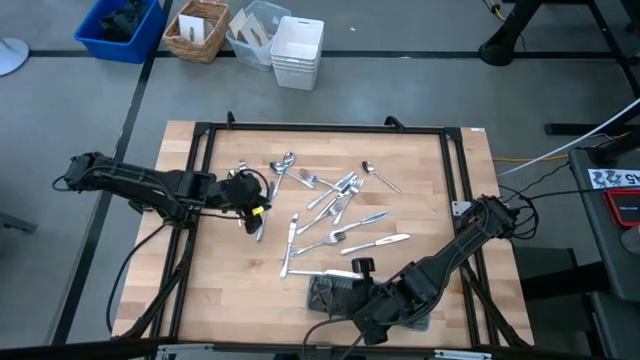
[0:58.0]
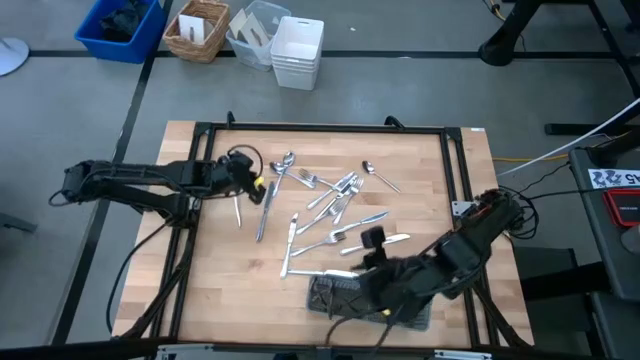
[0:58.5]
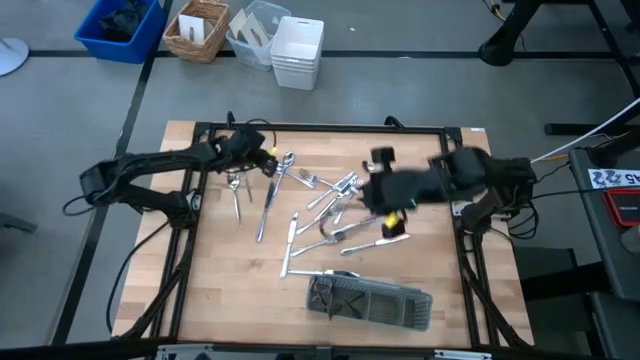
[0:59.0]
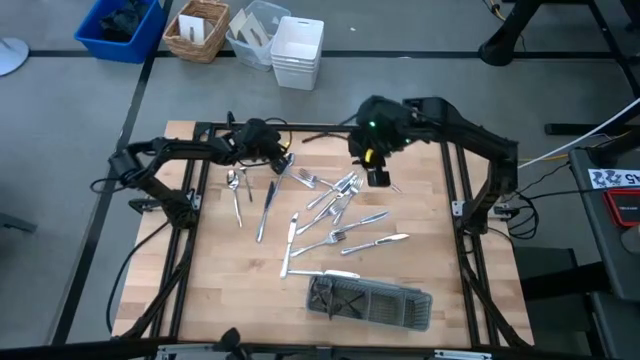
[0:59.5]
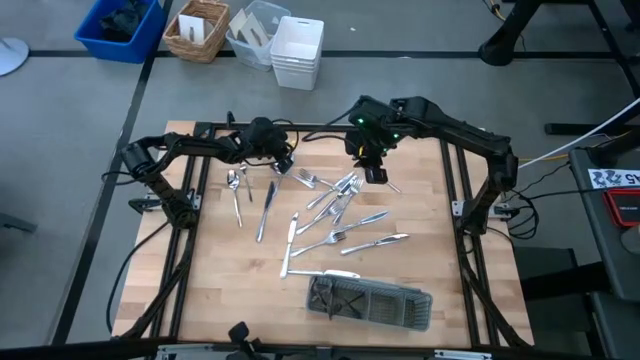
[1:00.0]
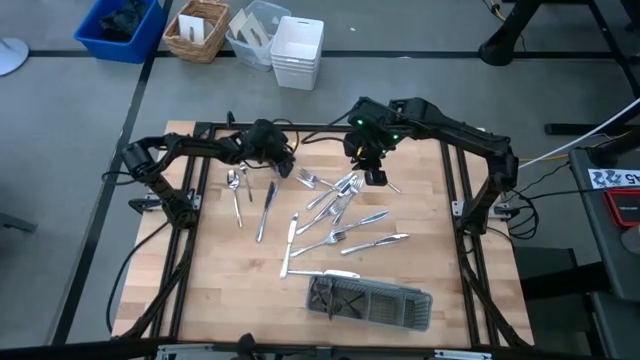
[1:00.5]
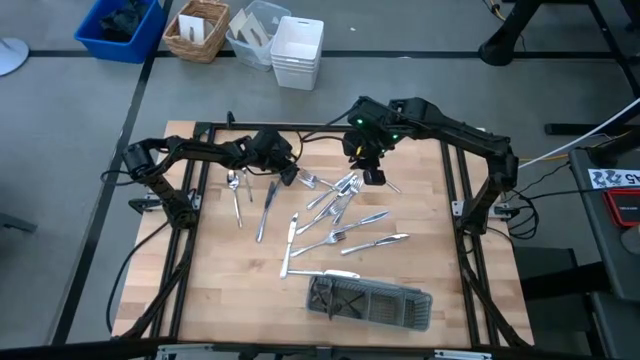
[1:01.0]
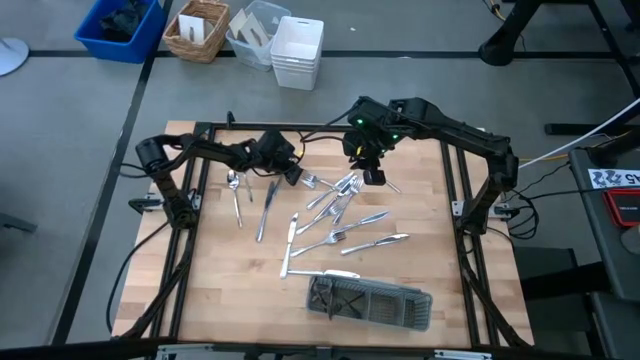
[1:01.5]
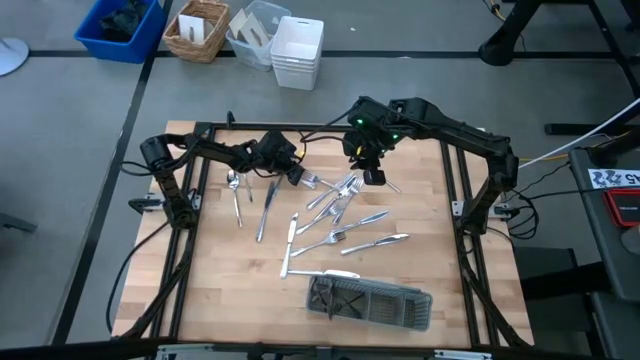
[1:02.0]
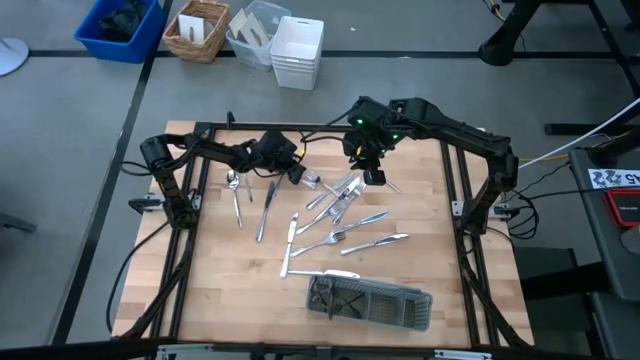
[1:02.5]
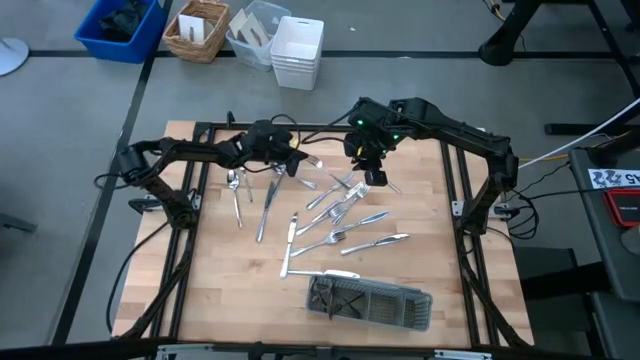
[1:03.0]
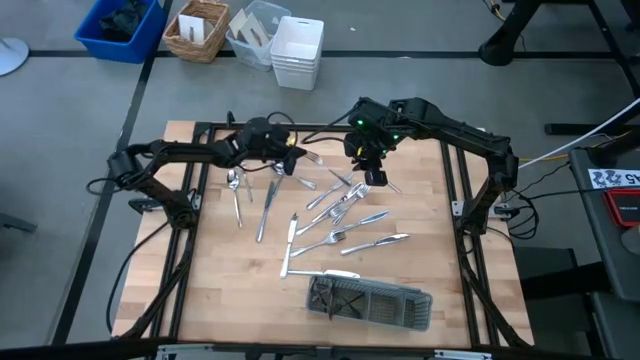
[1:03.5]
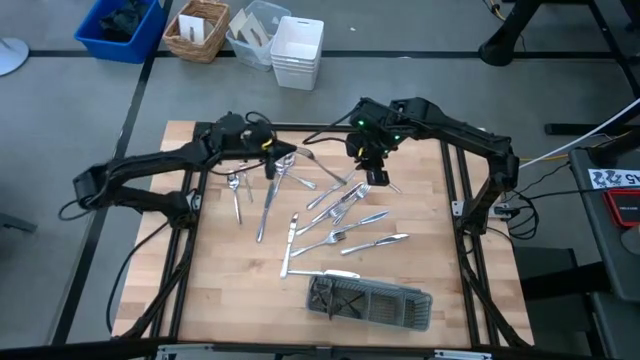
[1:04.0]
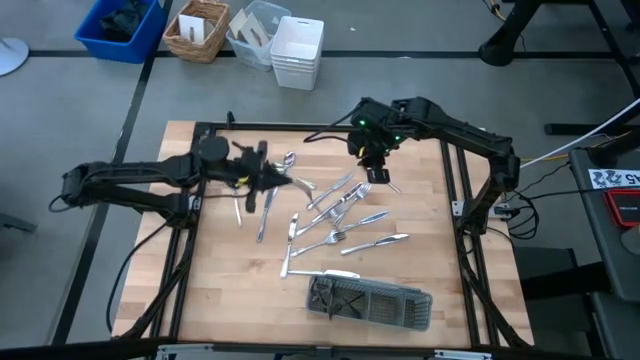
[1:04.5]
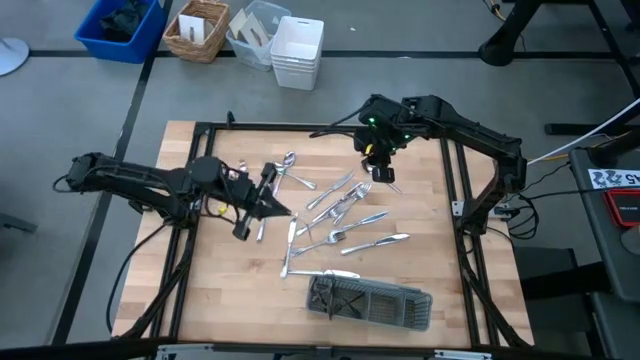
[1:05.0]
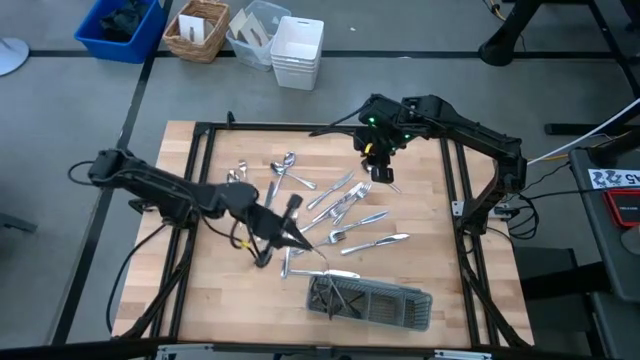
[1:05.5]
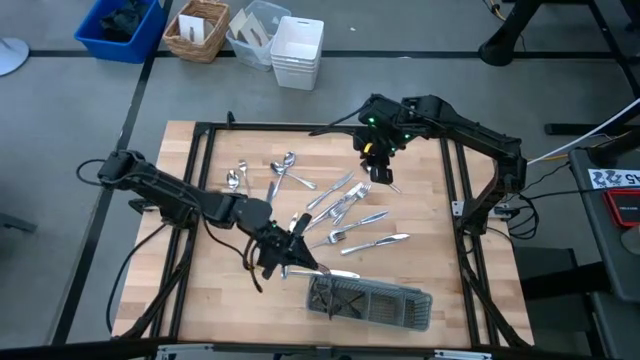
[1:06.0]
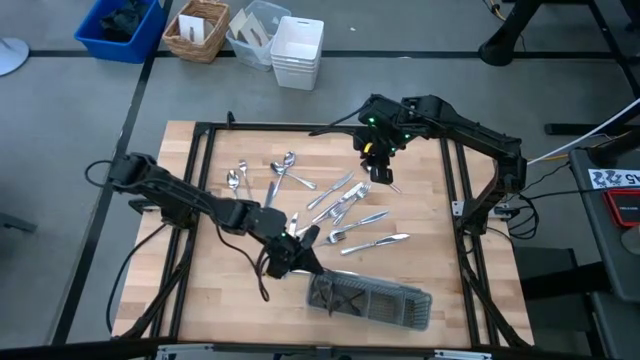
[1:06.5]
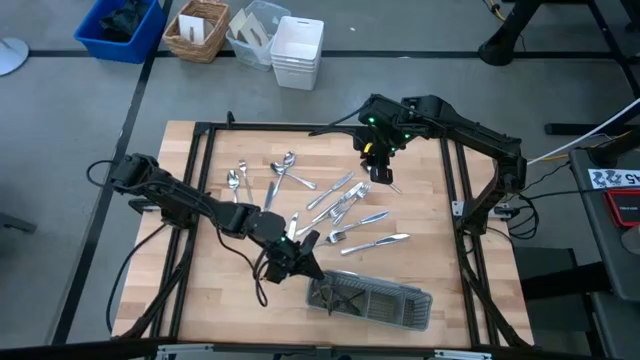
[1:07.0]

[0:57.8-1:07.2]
Task: Sort silverware
Put the fork into the gray silverware rack

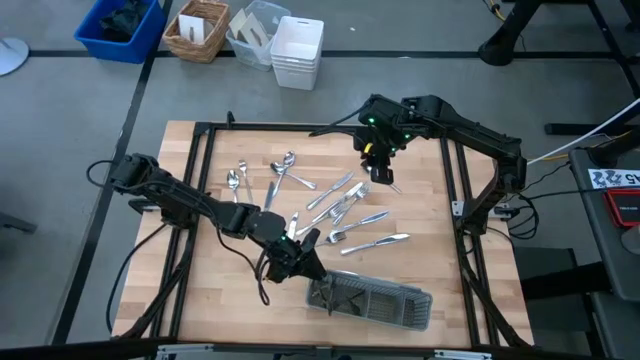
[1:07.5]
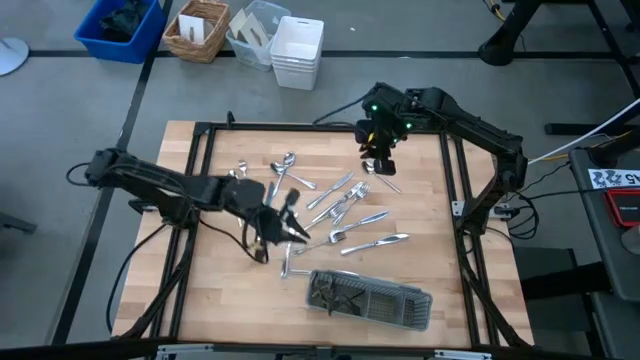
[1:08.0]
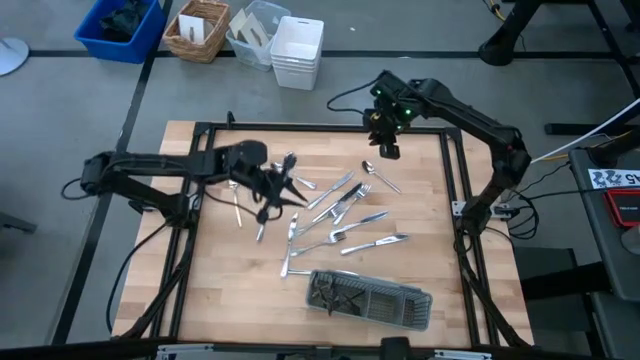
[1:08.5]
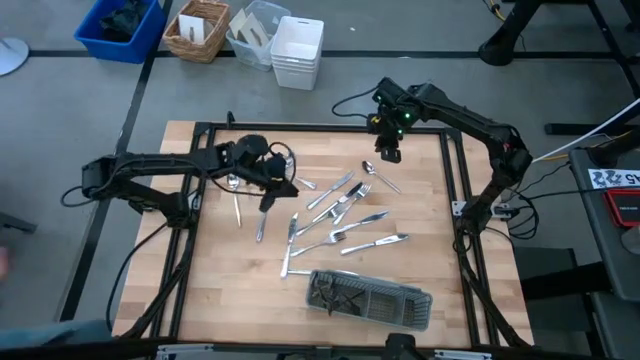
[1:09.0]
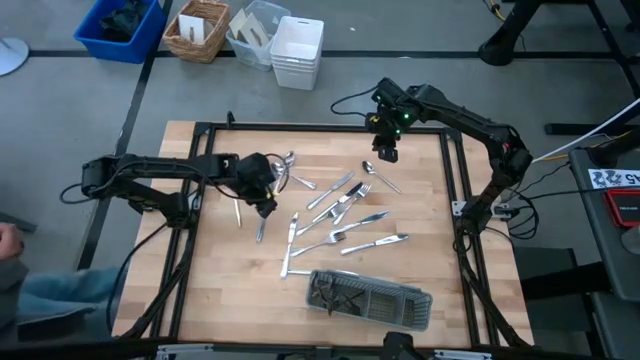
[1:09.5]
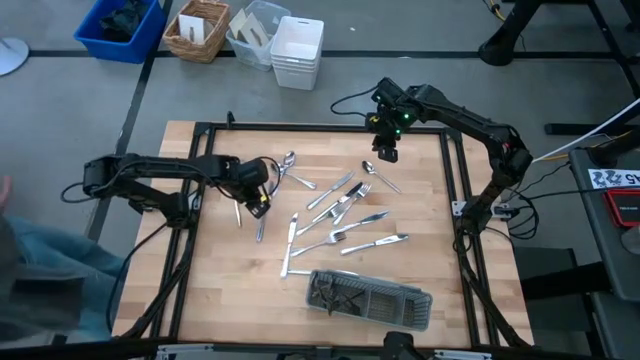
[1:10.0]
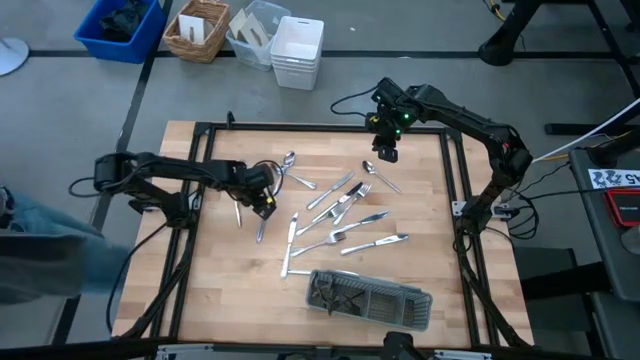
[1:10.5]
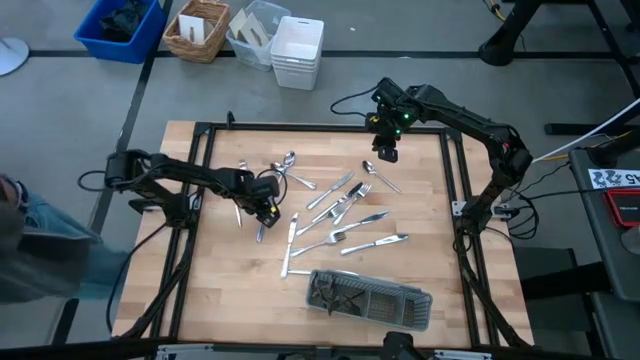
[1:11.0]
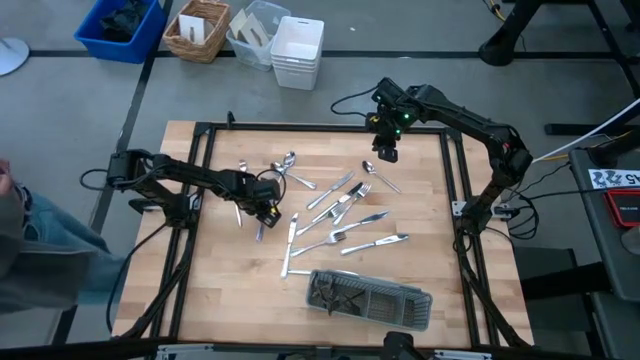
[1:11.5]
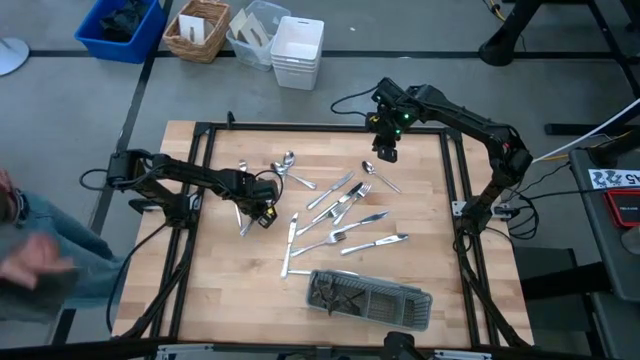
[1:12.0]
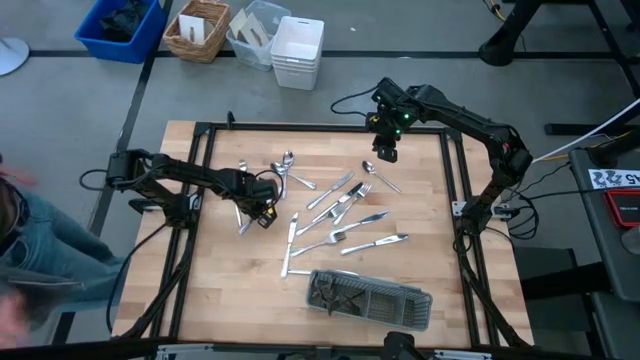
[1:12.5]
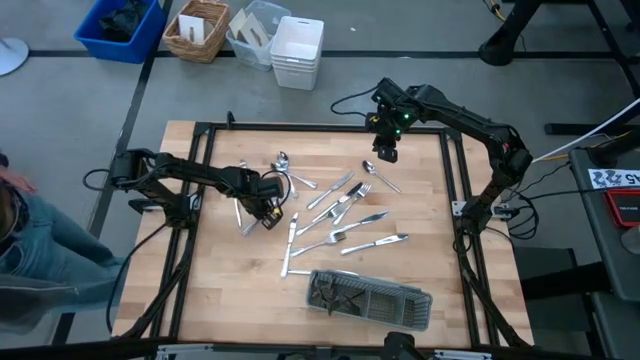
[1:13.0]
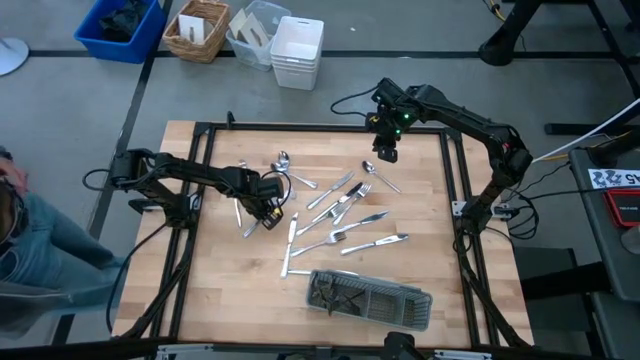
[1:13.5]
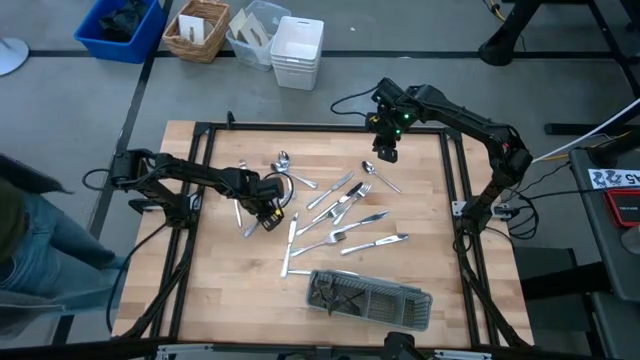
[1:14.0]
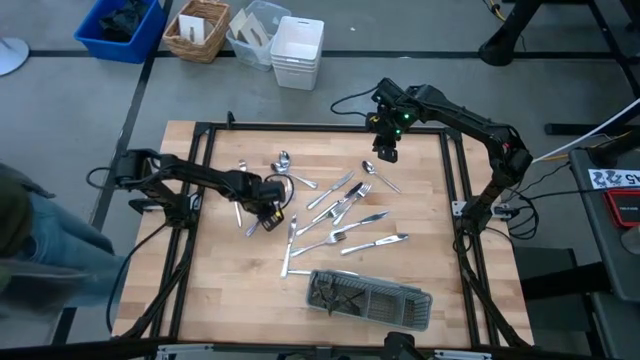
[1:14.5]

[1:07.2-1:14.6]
Put the knife into the gray silverware rack

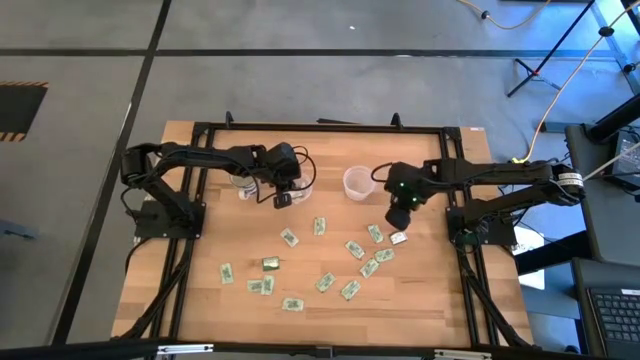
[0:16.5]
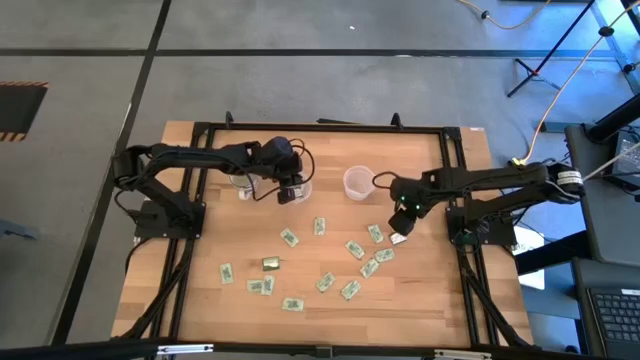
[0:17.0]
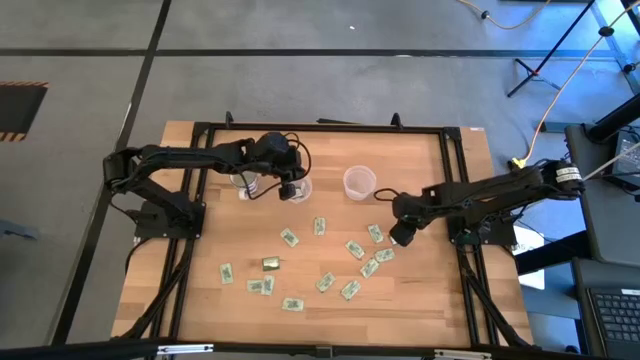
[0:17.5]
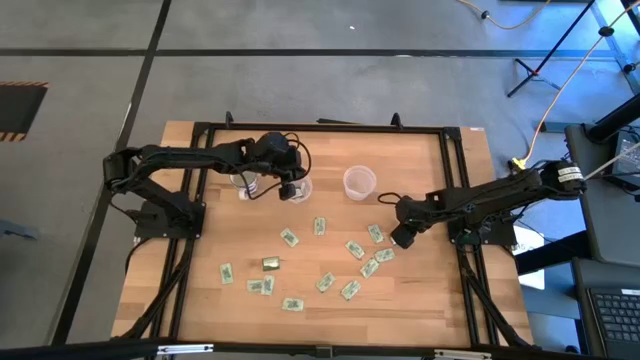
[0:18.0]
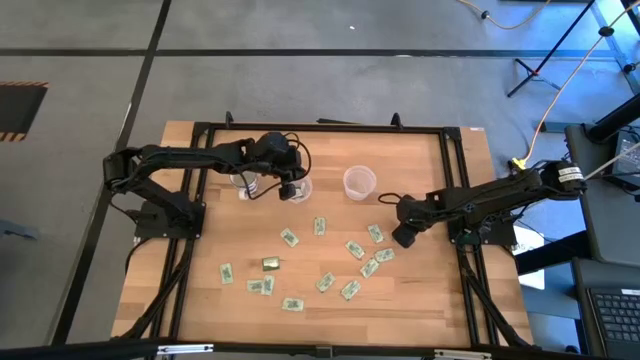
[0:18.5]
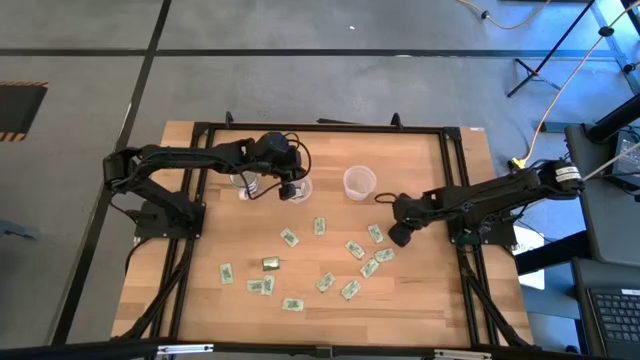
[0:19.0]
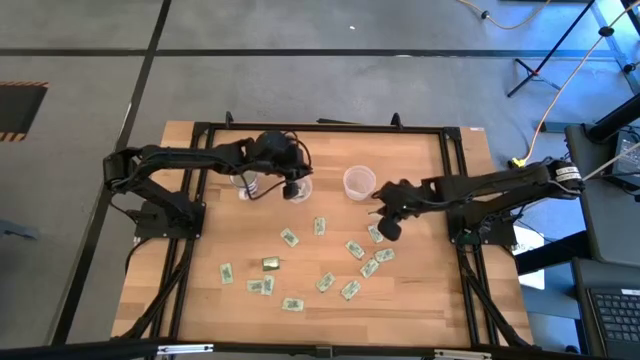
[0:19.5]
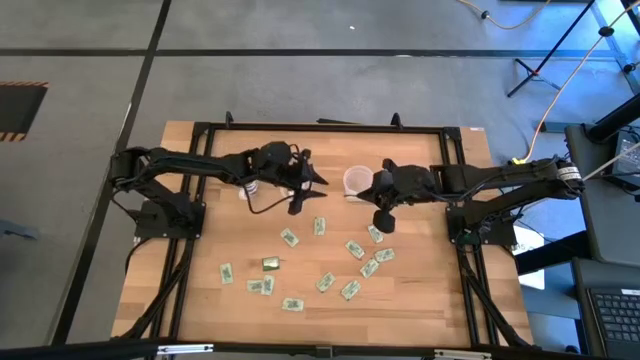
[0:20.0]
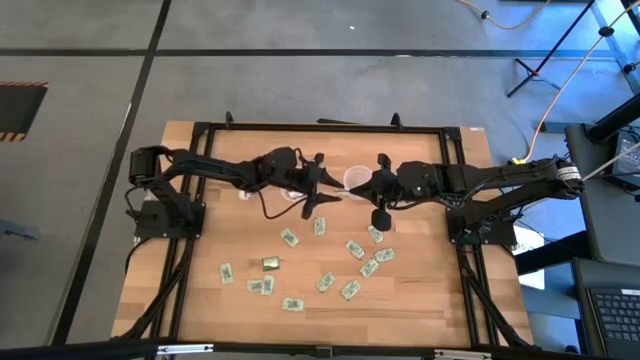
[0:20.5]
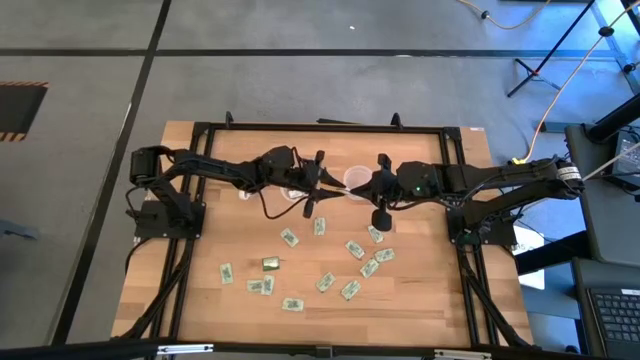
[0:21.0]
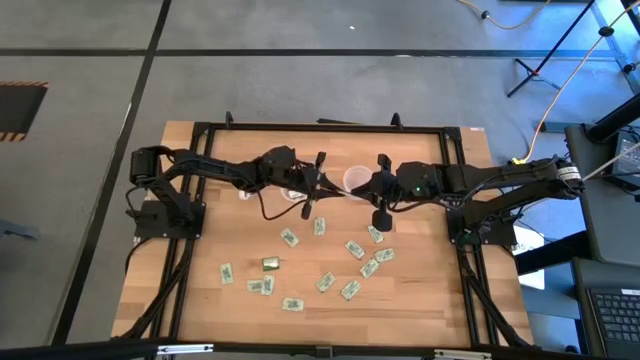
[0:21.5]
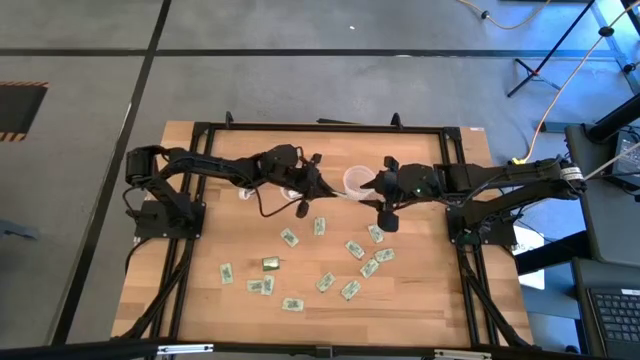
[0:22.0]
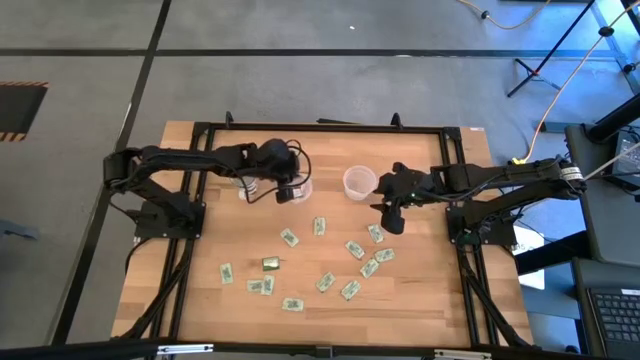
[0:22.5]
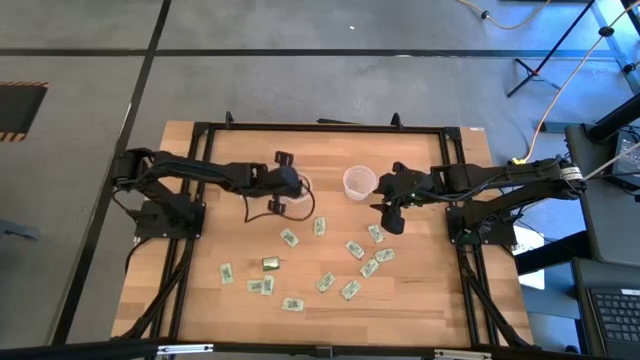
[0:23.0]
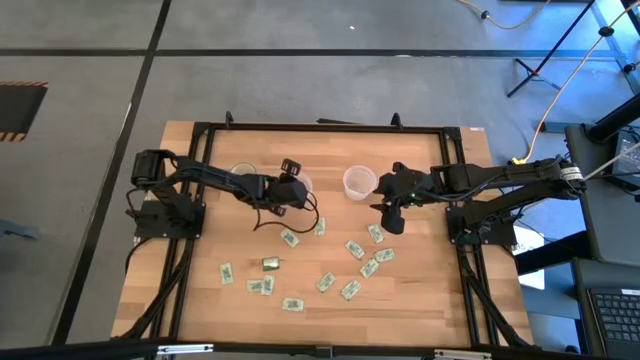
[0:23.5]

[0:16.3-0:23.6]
Task: Pick and place items into bin
Put the green truvia packet into the left transparent bin
